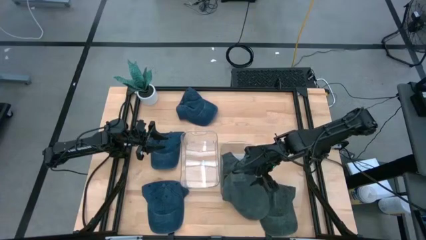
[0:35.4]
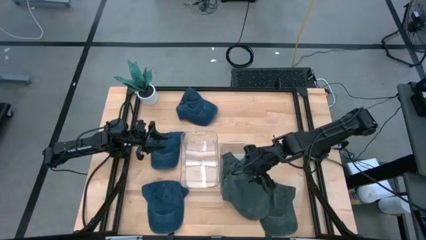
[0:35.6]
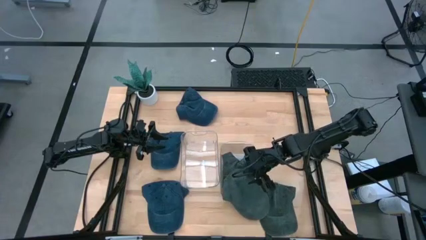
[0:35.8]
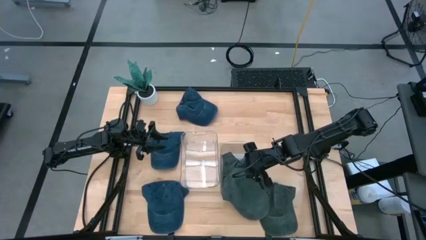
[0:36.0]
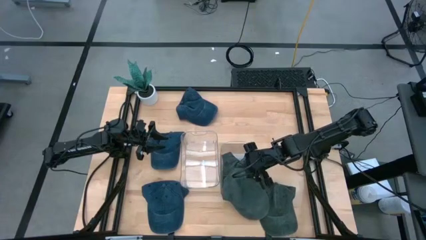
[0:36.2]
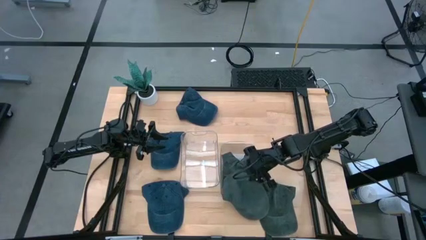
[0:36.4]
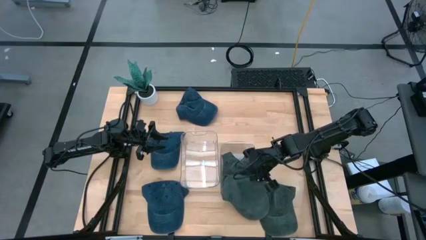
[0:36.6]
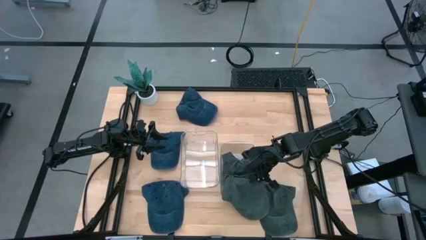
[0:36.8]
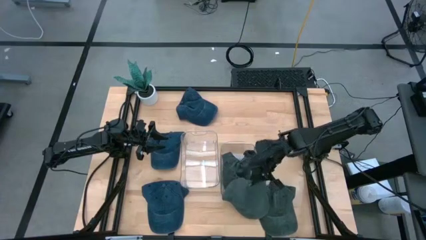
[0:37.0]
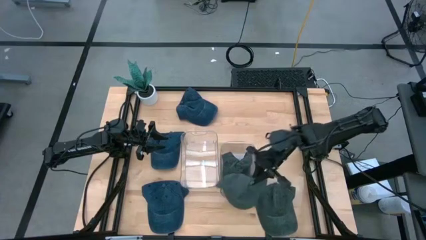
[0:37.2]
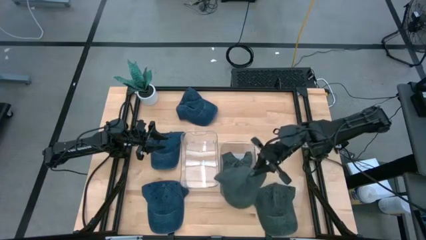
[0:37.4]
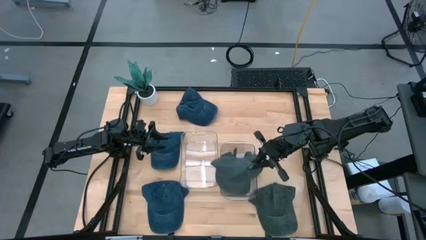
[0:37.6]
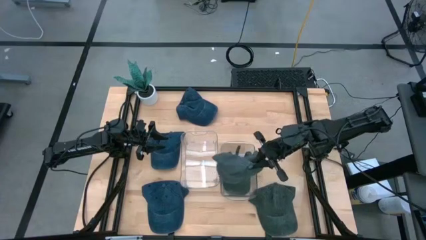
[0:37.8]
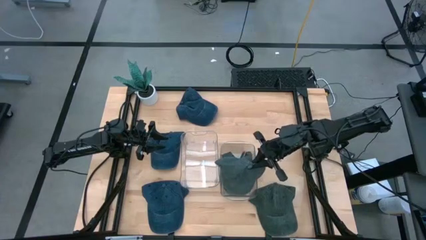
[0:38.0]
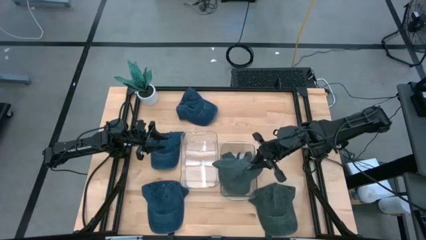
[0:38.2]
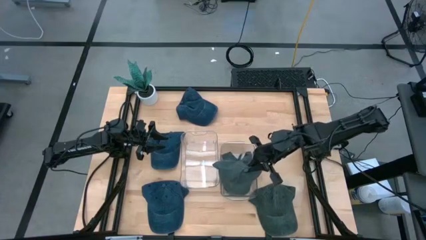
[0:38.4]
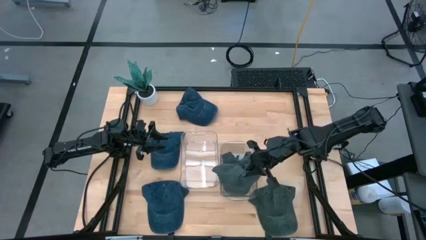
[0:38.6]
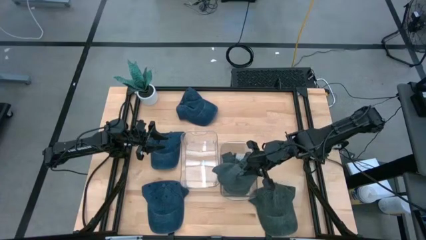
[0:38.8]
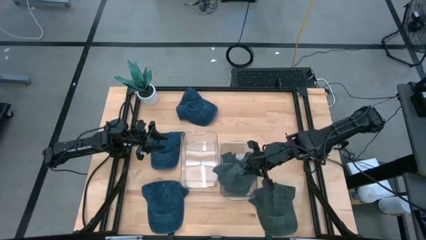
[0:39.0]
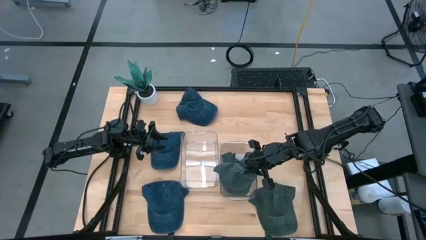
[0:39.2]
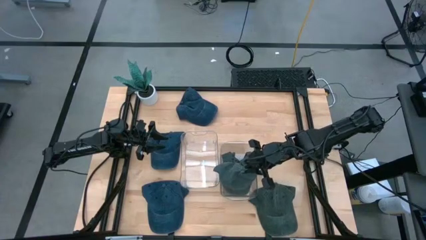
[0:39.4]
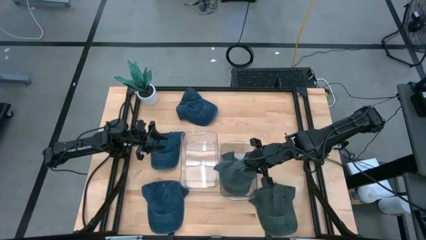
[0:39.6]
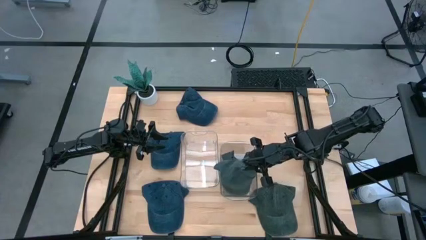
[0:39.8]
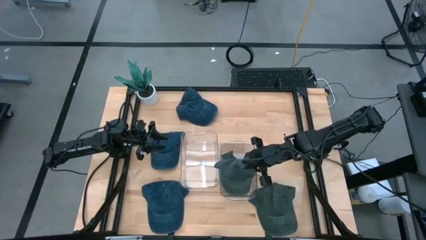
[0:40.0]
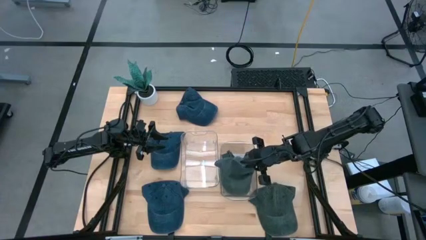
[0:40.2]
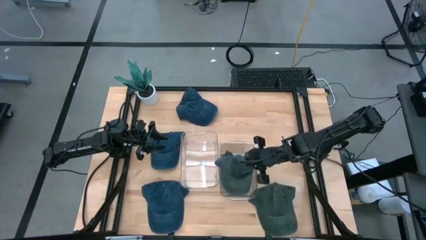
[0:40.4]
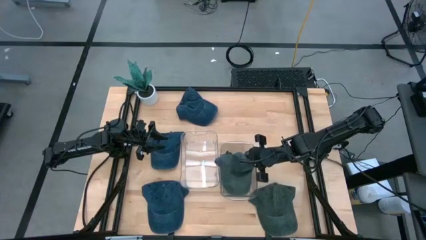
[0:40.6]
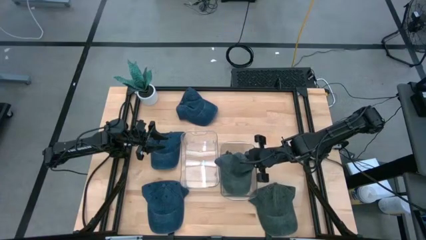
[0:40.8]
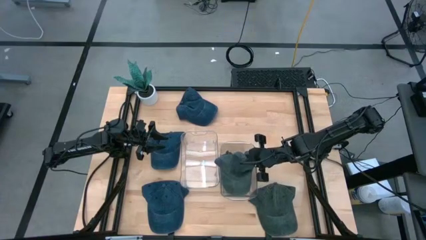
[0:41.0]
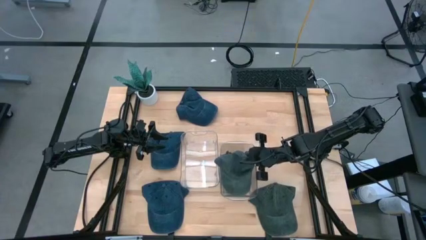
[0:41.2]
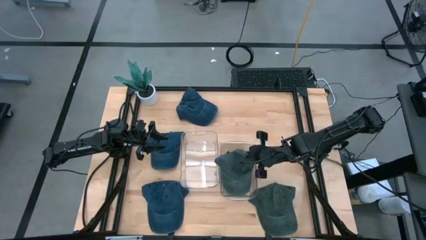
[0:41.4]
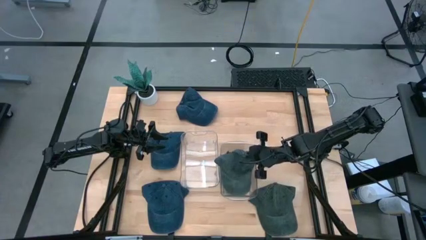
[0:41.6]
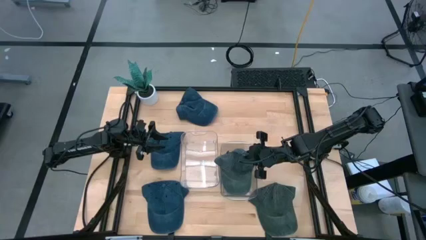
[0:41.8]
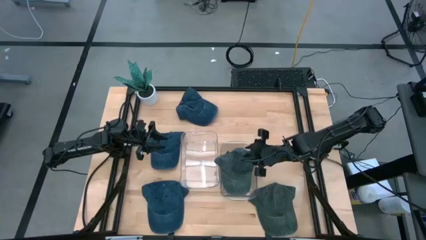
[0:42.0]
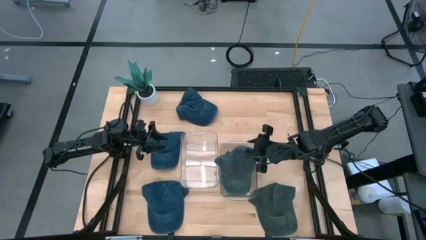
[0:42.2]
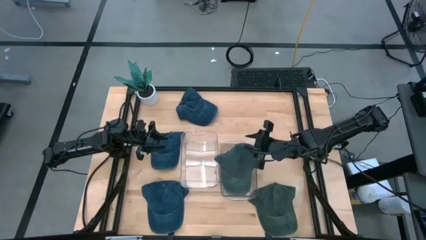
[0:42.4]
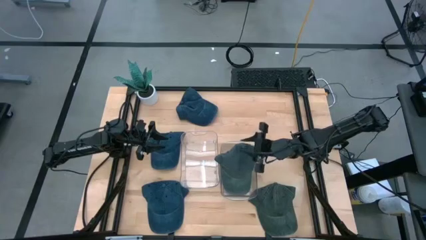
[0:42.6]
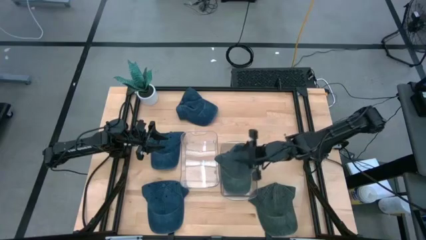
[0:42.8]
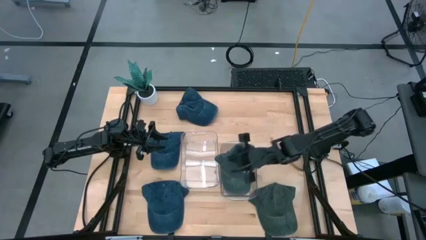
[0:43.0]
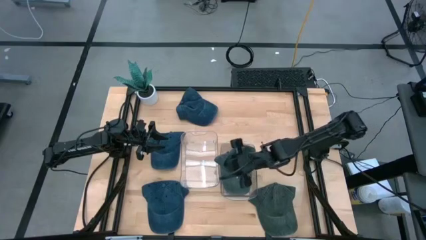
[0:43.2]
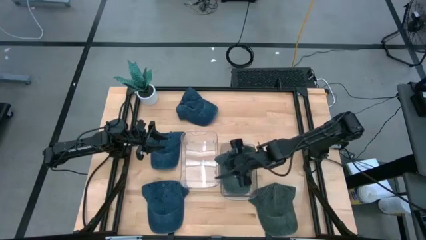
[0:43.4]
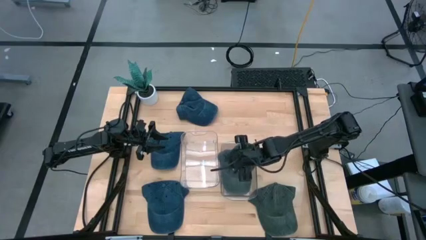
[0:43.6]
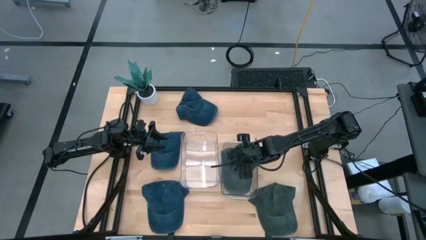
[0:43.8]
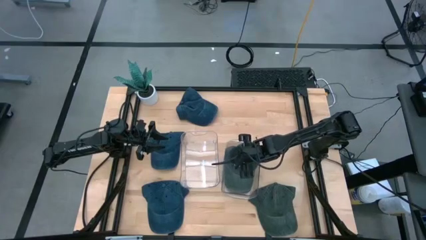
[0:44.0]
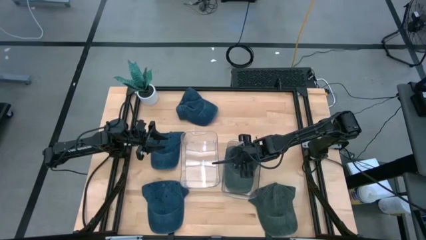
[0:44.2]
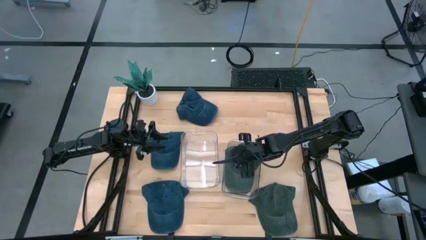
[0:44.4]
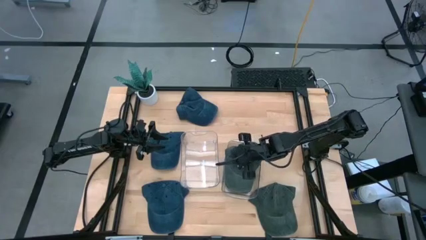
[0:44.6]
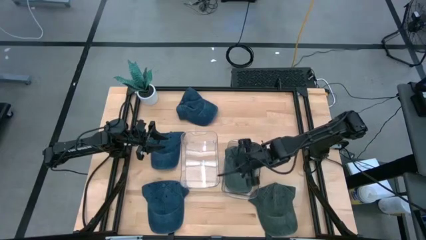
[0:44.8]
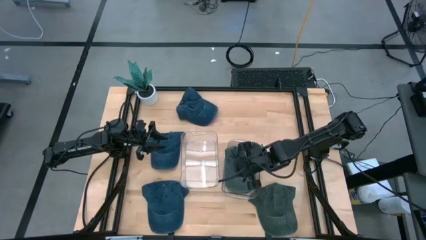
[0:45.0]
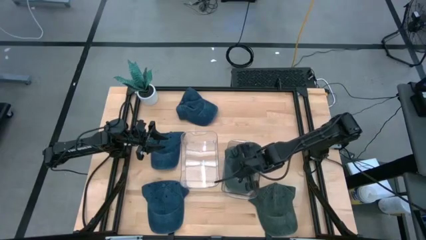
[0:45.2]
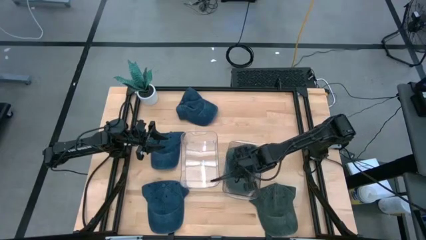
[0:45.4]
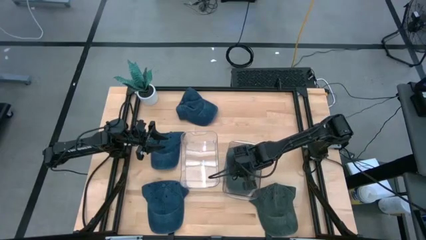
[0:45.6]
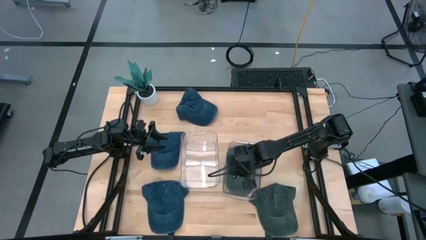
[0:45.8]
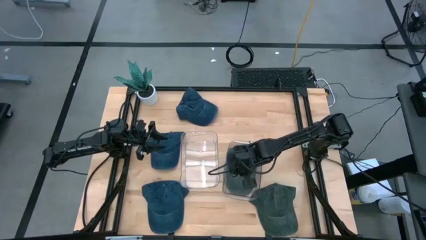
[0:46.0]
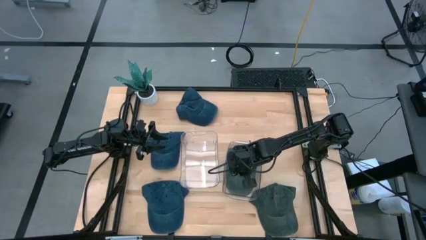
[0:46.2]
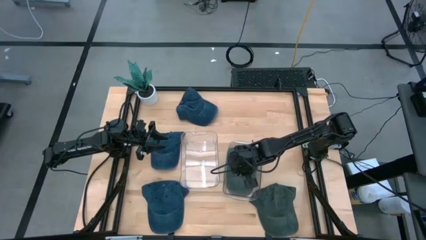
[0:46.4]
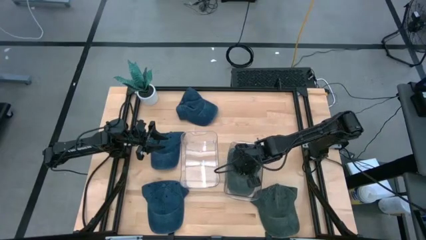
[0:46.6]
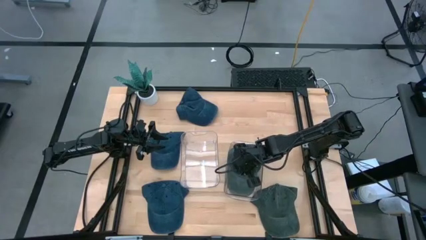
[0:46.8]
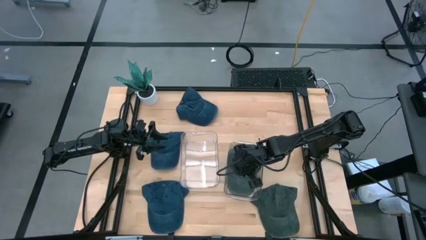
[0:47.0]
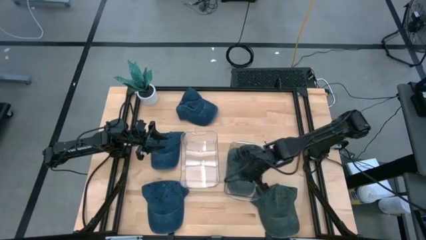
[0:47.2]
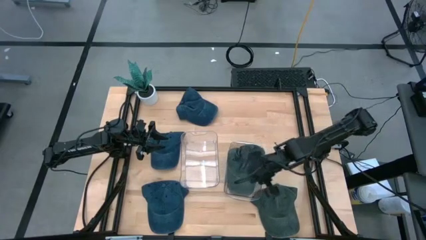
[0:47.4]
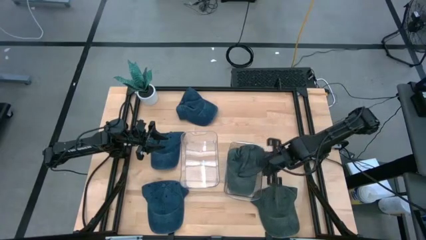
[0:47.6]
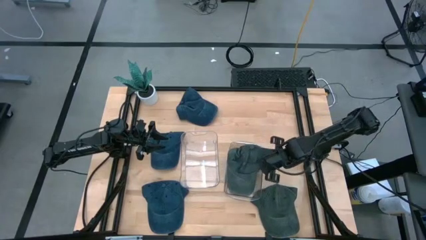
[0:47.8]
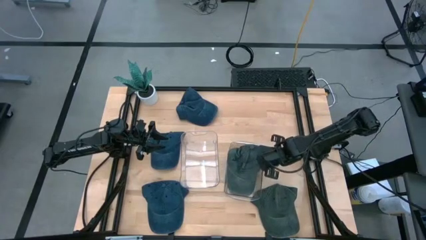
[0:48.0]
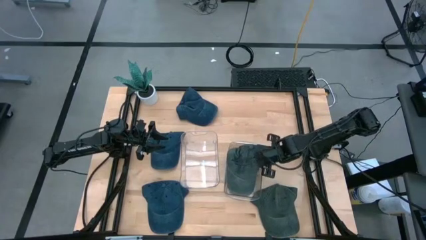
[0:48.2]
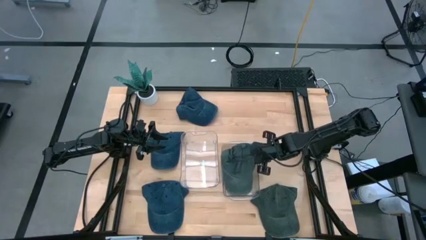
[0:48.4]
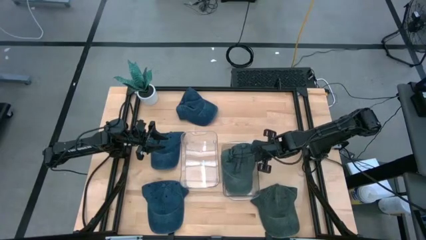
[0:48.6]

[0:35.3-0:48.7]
Task: Pick & Place hat
Put the top gray cap into the right transparent bin

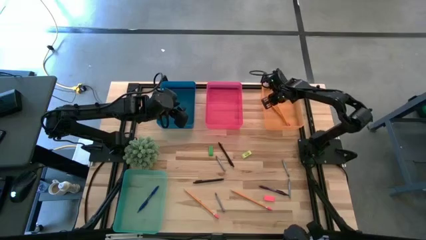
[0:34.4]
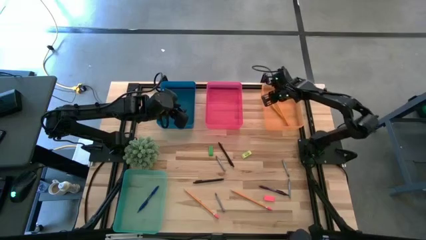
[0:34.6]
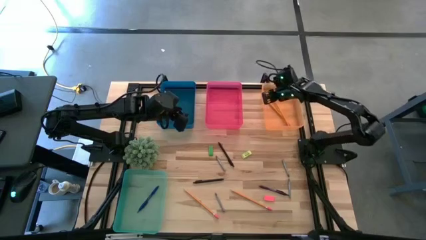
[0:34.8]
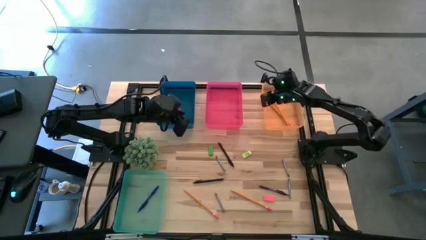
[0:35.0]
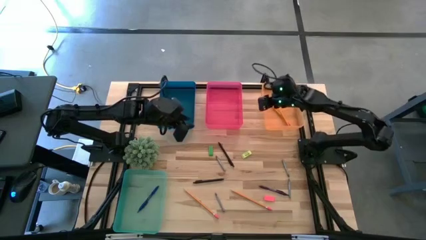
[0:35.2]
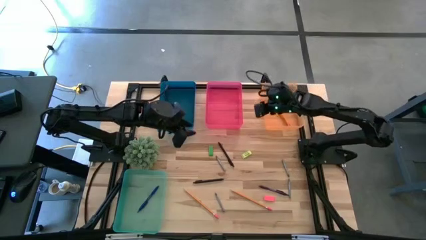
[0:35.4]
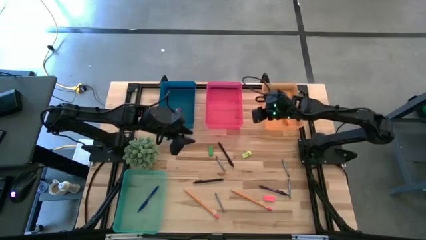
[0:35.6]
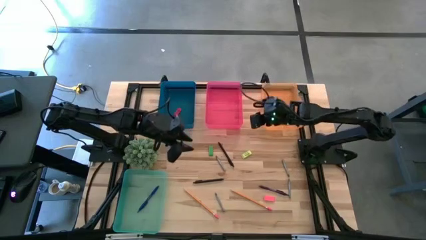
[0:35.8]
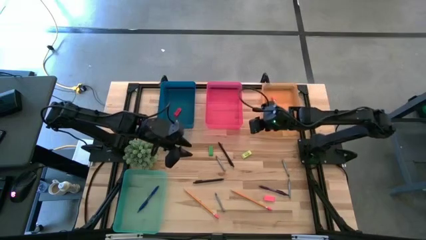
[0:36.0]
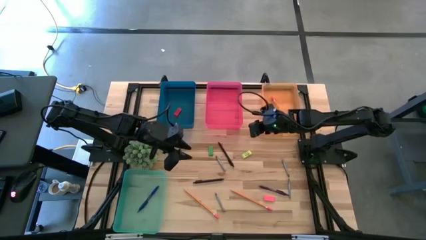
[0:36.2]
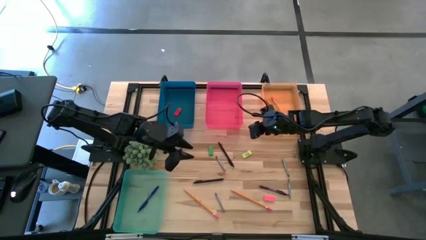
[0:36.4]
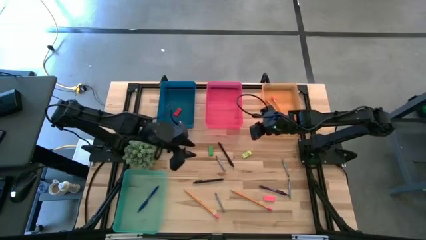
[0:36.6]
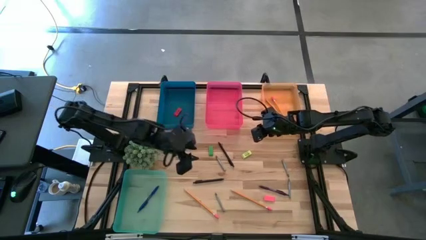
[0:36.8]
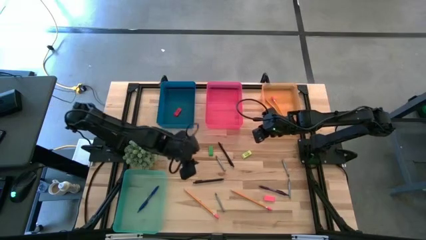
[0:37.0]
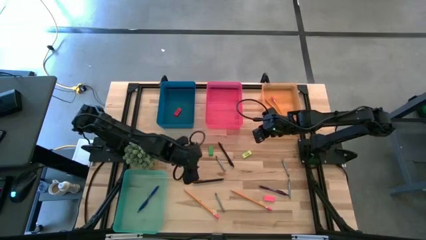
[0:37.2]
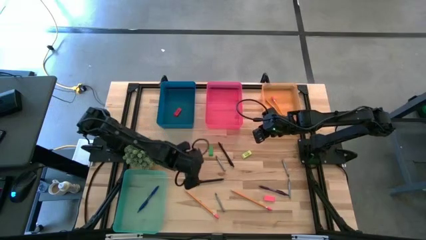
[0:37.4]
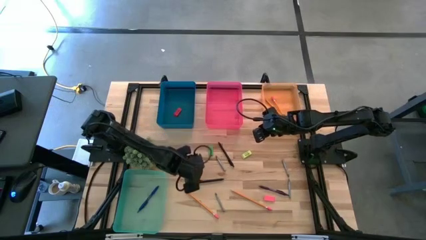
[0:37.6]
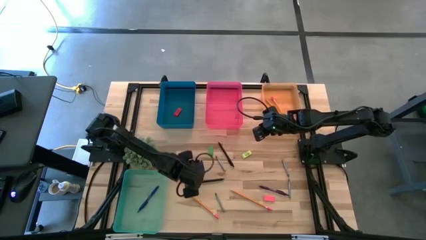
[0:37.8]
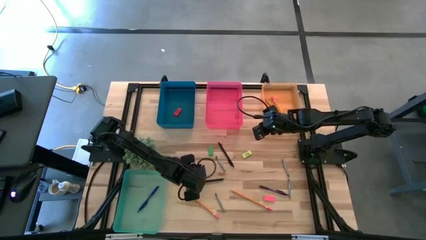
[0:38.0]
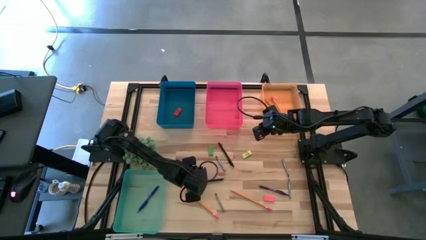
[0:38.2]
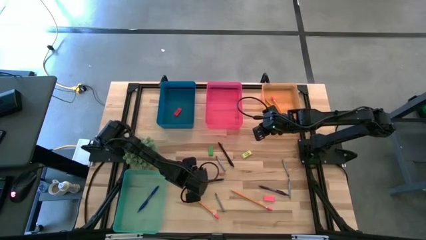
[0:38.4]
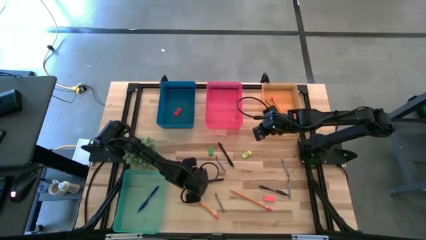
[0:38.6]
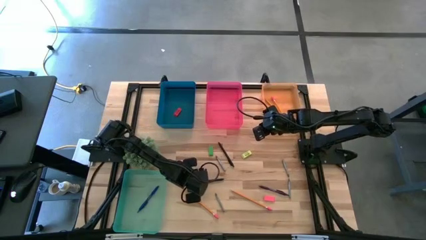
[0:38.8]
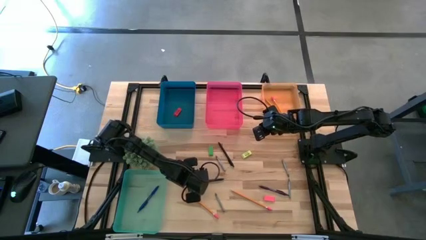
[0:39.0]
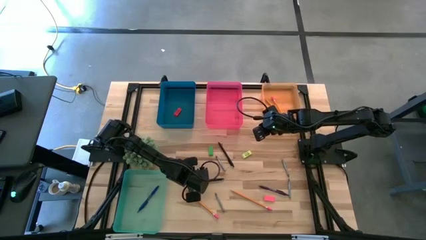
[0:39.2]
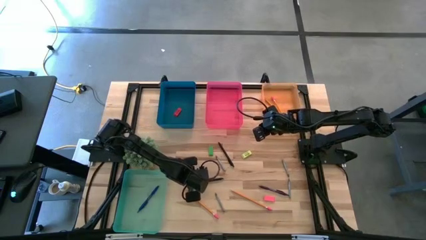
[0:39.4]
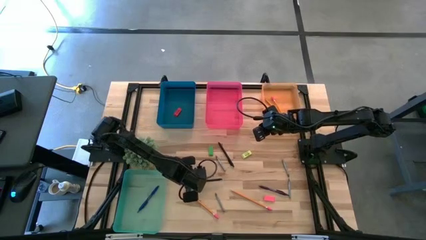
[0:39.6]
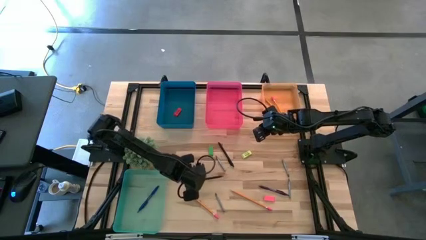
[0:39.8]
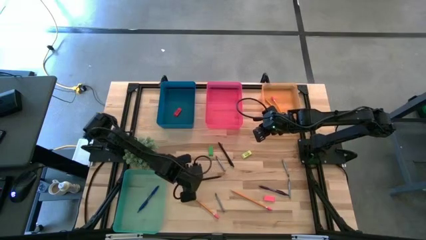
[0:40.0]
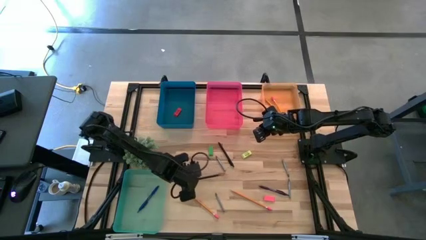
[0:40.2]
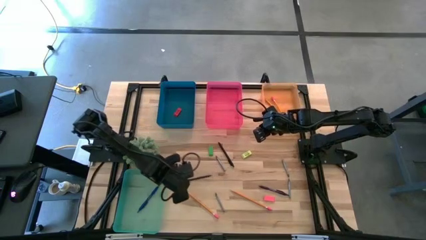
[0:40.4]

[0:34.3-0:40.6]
Task: Sort crayons/erasers/pens/pencils in bins
Put the left black pen into the transparent blue bin
